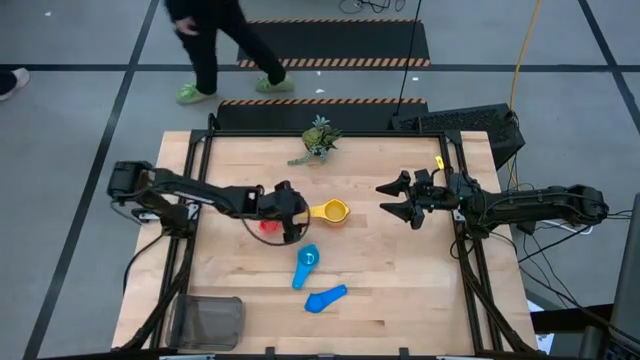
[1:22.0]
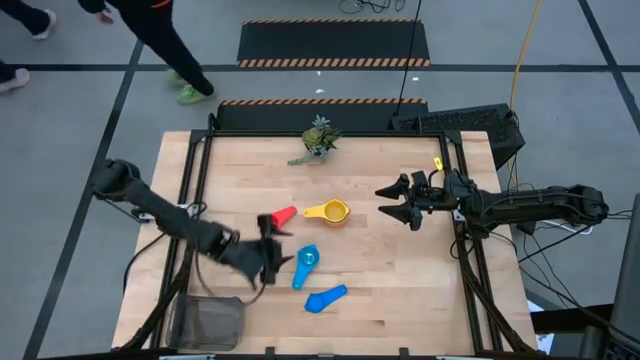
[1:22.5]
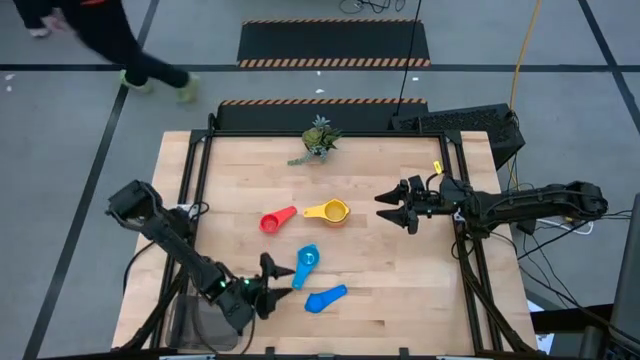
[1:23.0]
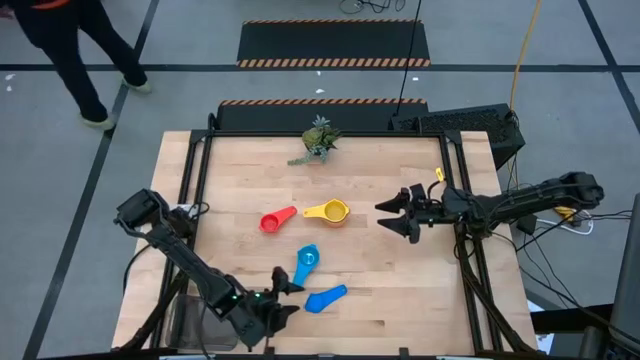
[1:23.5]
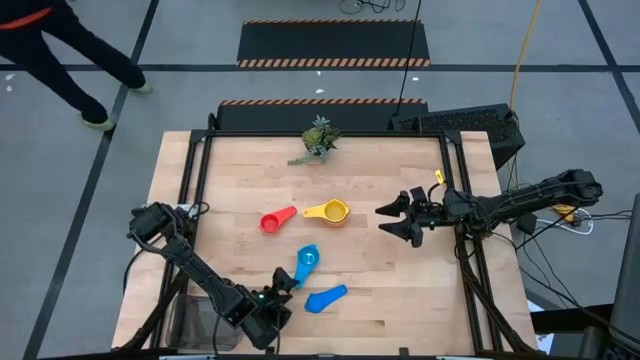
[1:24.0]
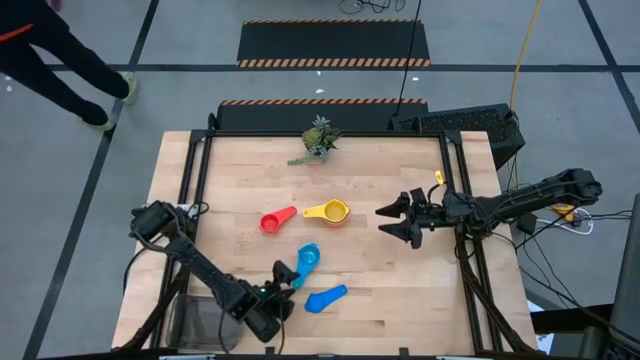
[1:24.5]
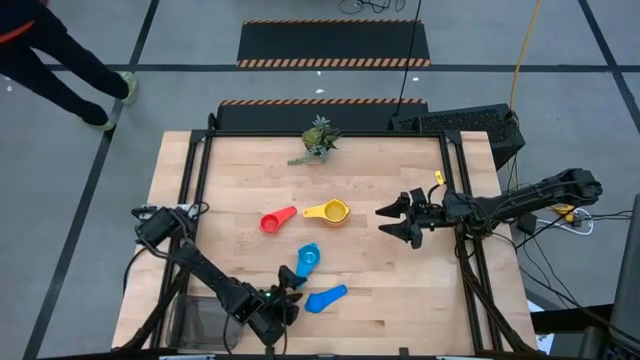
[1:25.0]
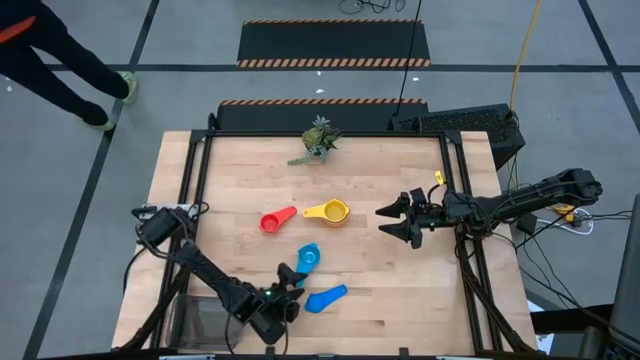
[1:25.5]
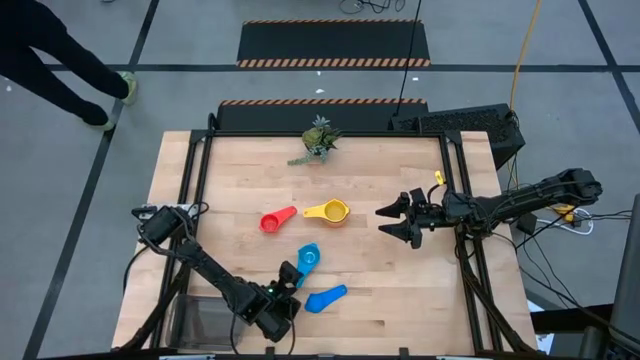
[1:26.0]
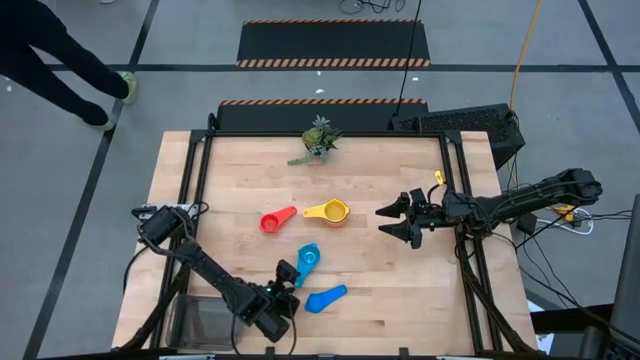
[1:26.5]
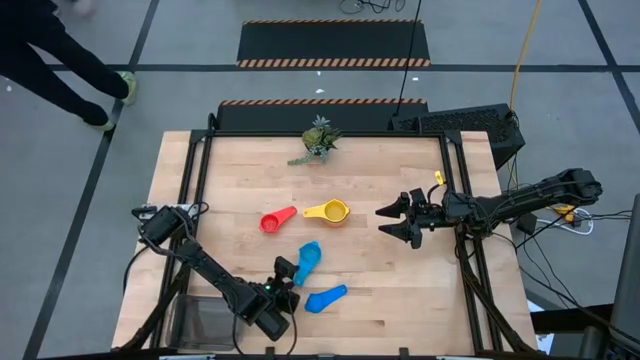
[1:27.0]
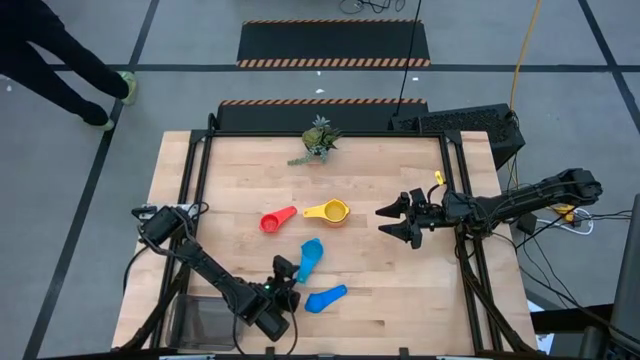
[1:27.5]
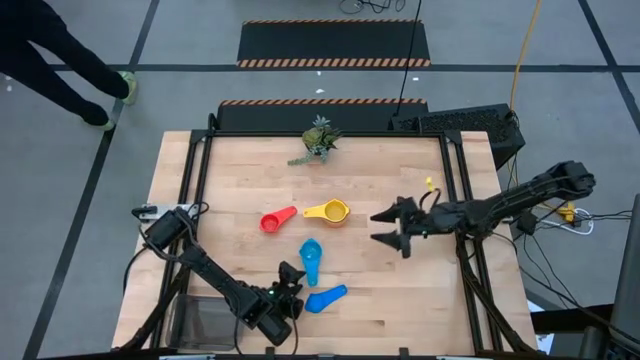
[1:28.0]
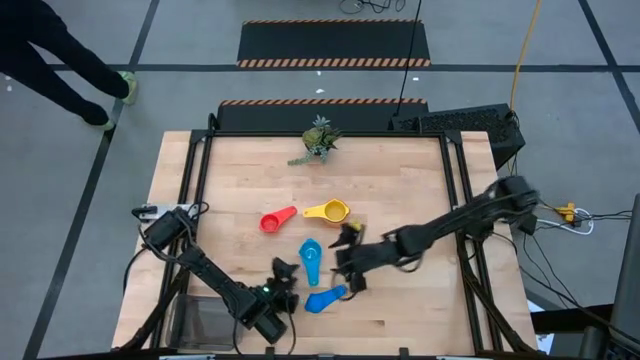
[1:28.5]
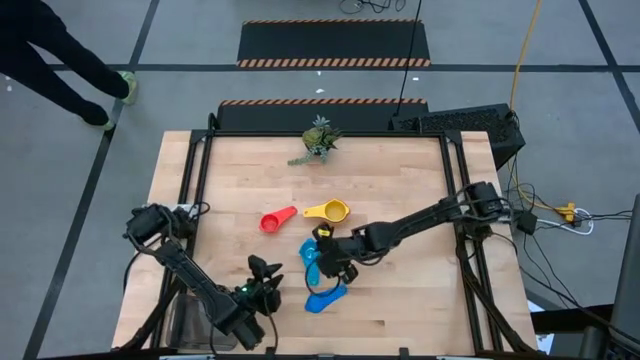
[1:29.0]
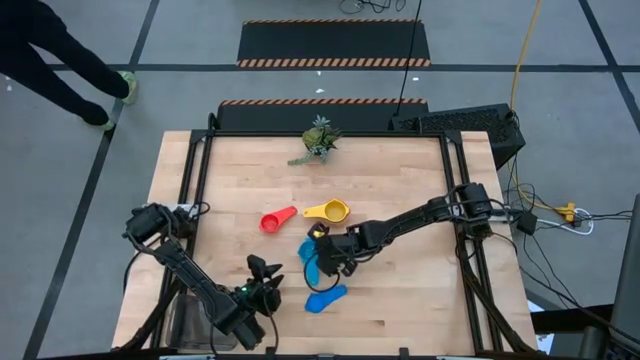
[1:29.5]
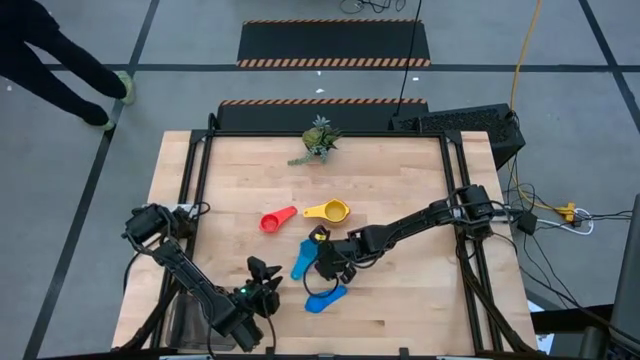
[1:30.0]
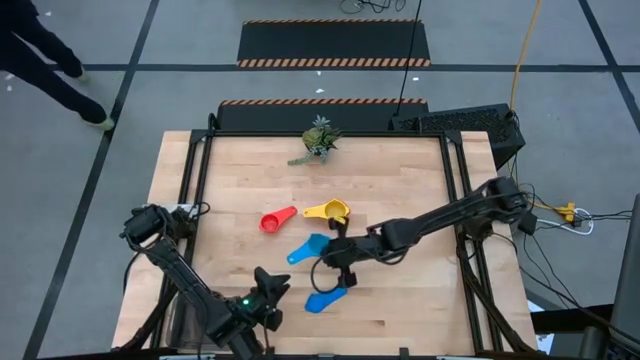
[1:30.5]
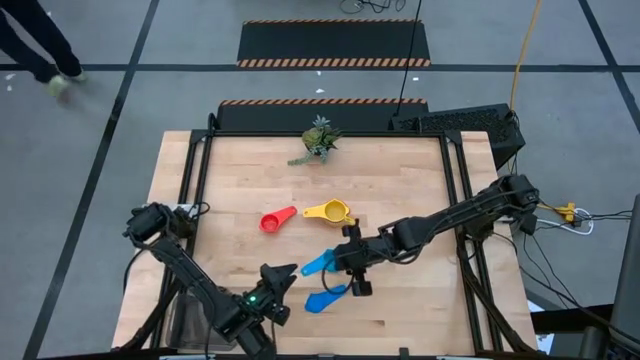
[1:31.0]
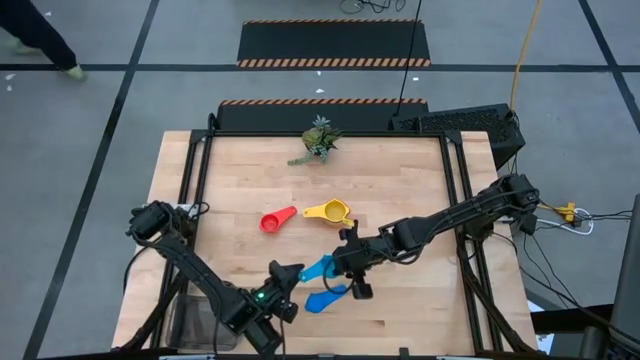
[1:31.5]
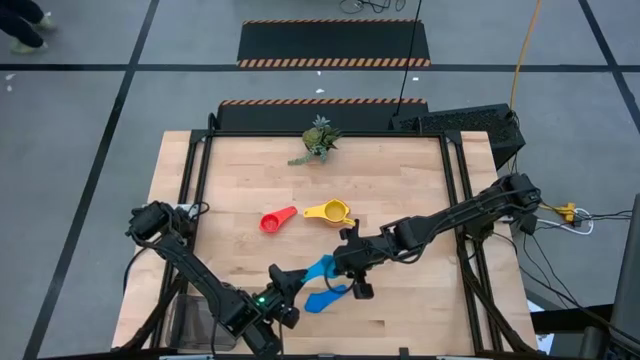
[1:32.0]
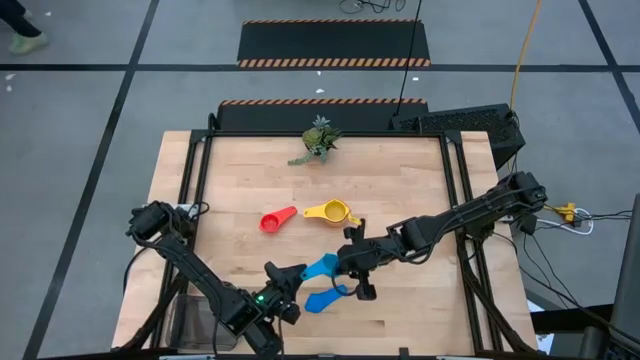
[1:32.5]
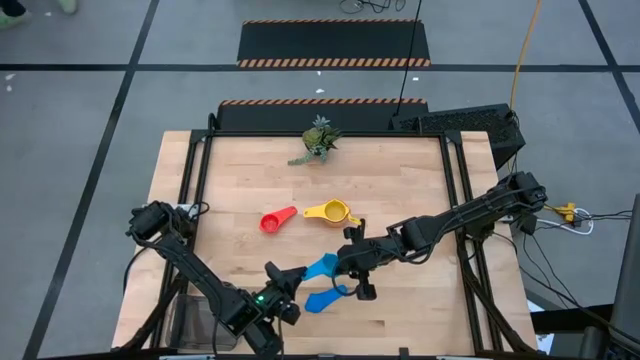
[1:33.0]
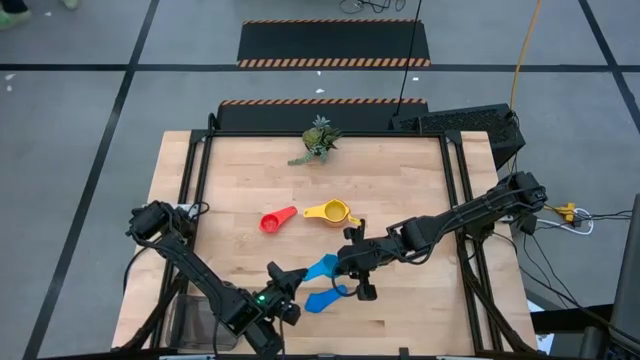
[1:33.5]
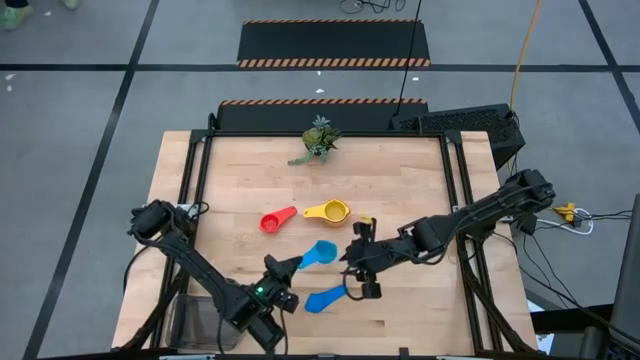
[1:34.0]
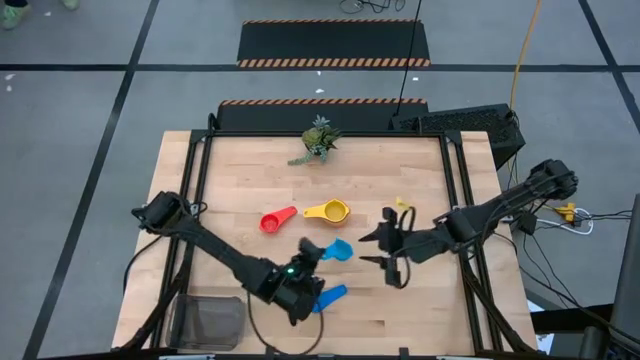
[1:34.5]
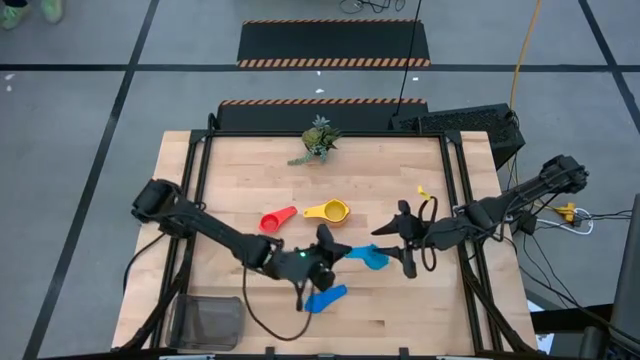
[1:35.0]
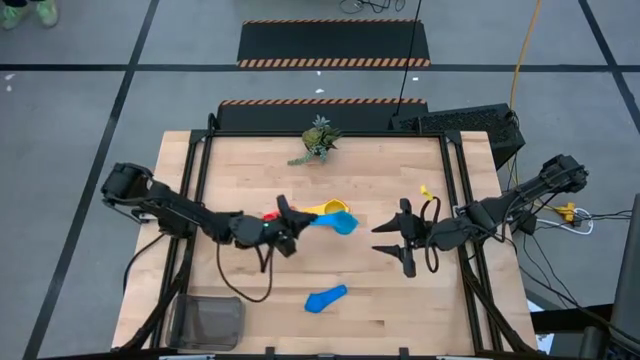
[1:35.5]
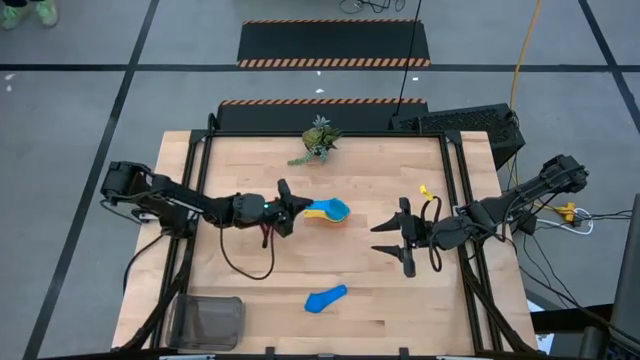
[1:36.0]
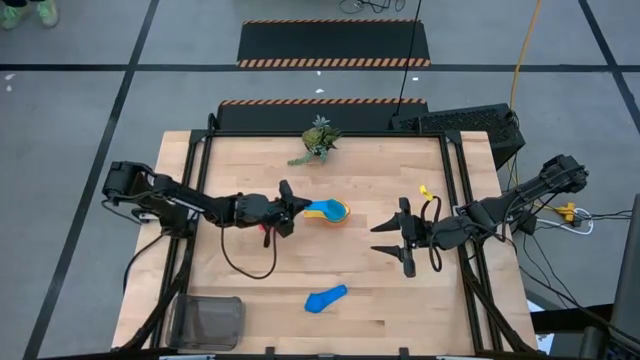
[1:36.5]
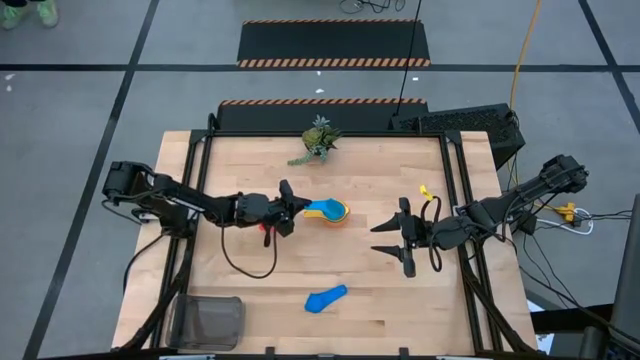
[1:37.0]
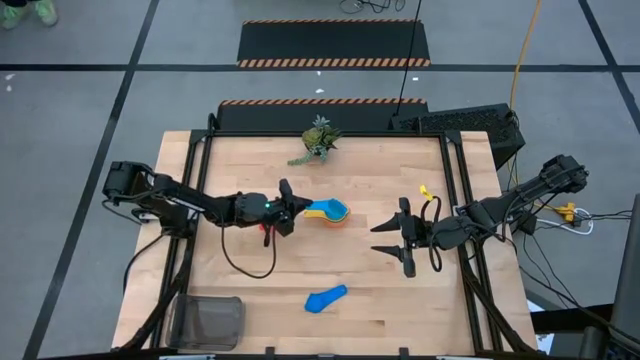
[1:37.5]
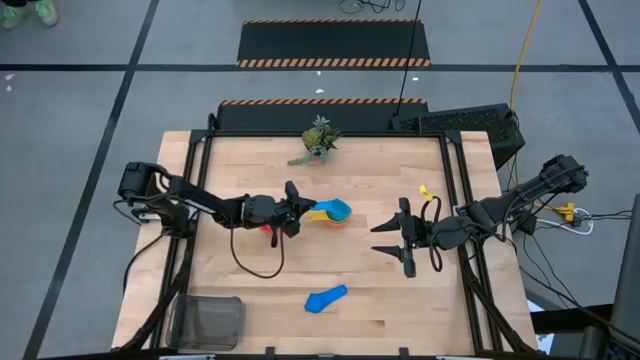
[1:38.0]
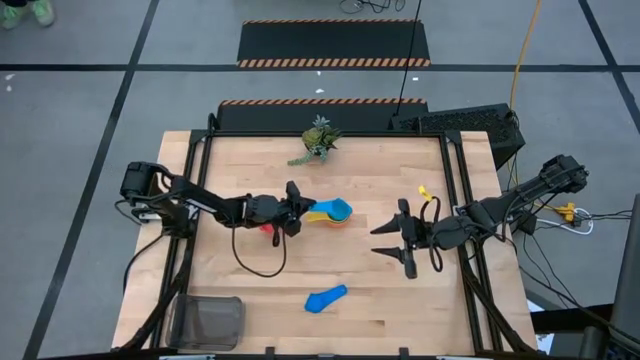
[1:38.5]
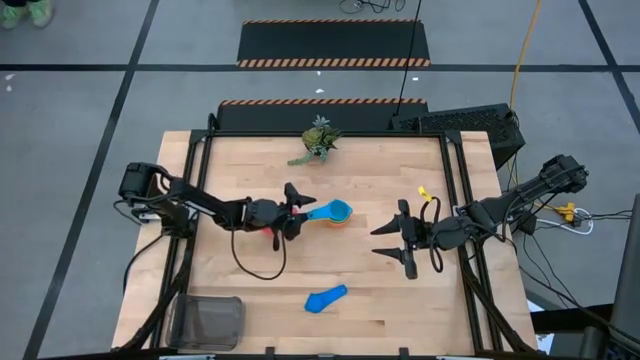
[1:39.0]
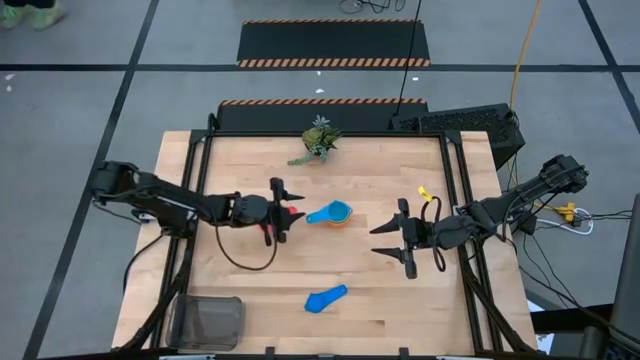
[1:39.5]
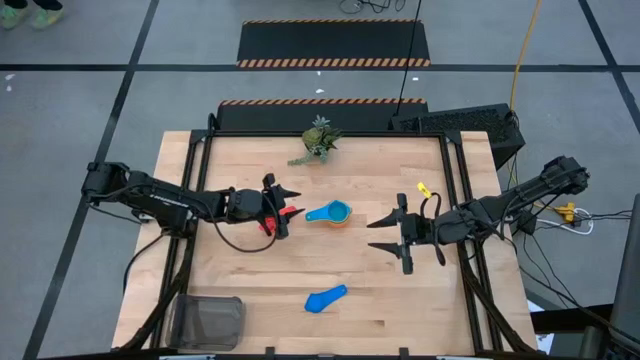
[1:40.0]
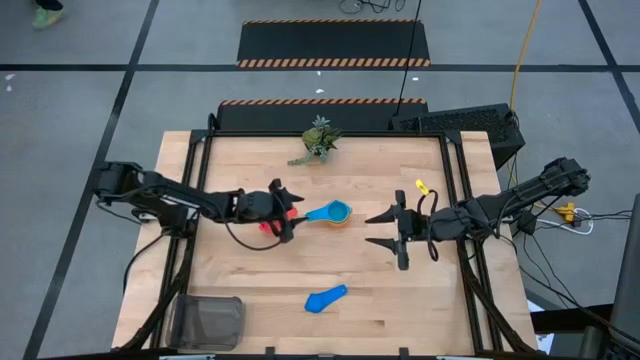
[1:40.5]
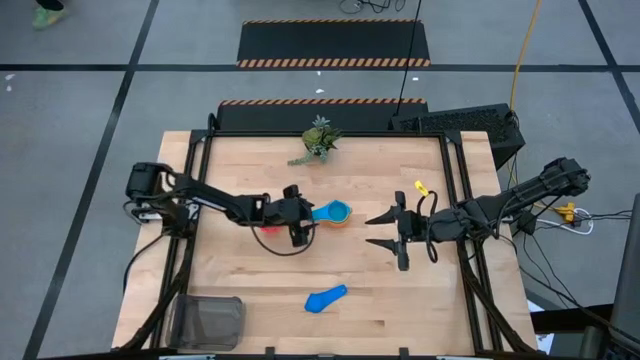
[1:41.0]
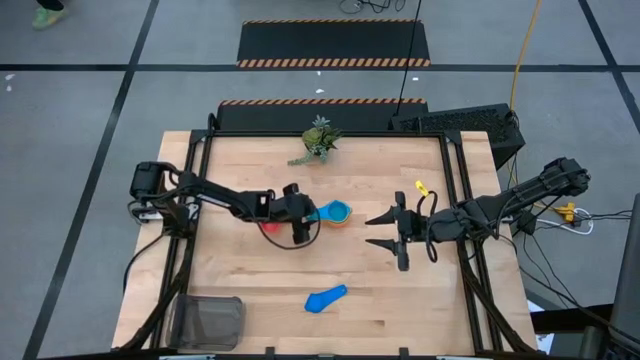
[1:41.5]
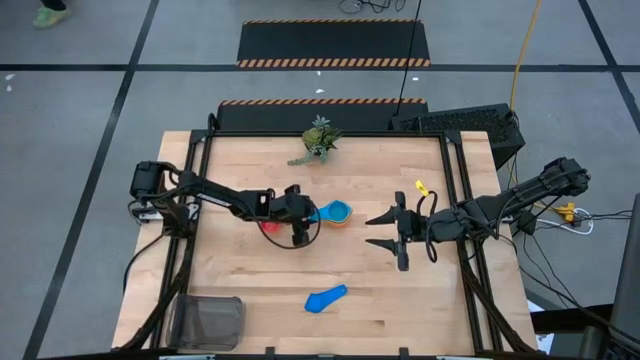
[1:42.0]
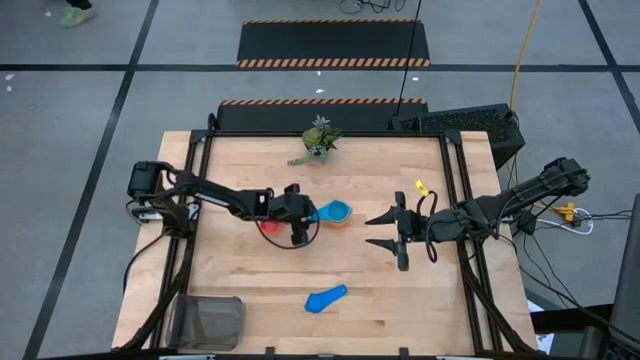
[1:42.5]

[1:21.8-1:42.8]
Task: Nest measuring cups in basket
Stack the top light blue measuring cup on top of the yellow measuring cup
